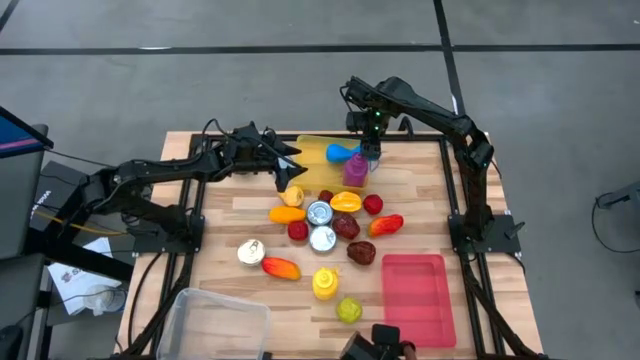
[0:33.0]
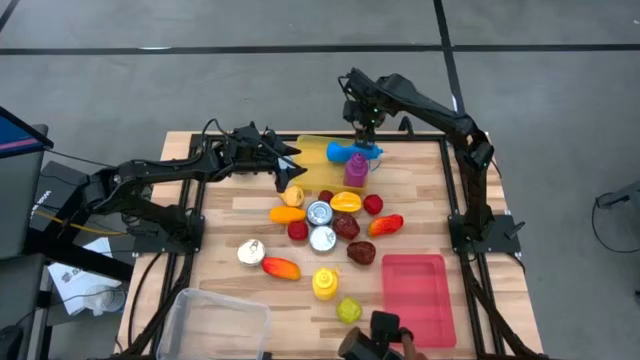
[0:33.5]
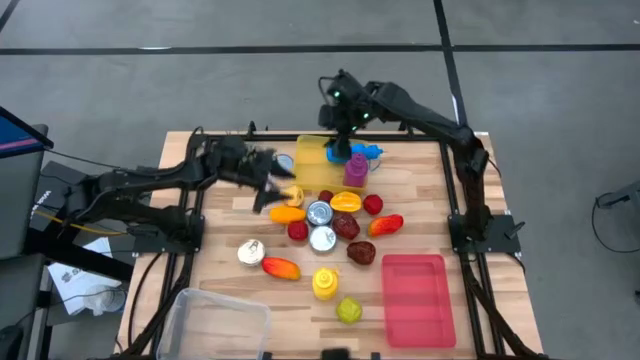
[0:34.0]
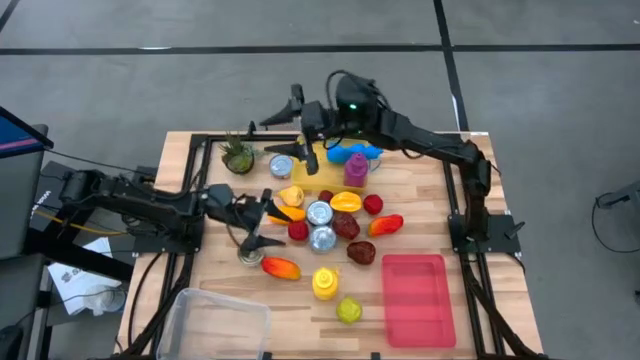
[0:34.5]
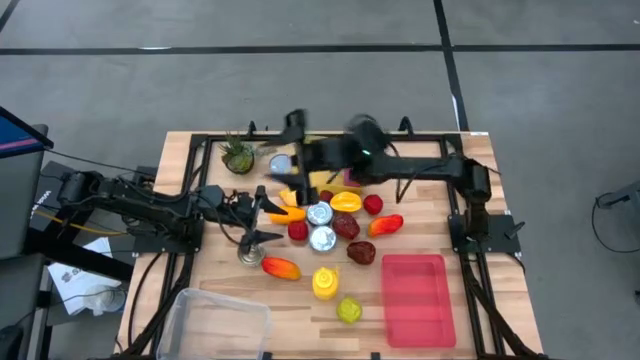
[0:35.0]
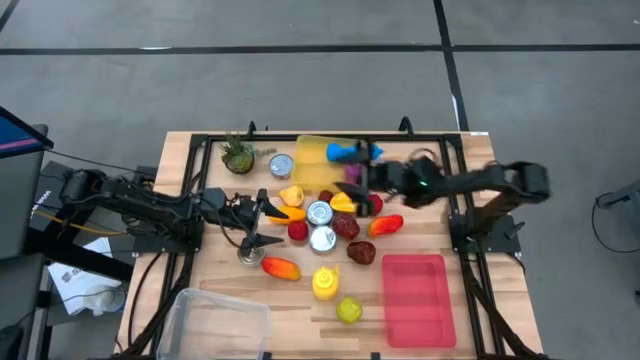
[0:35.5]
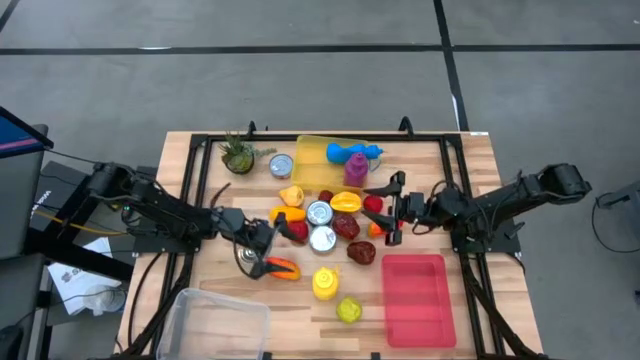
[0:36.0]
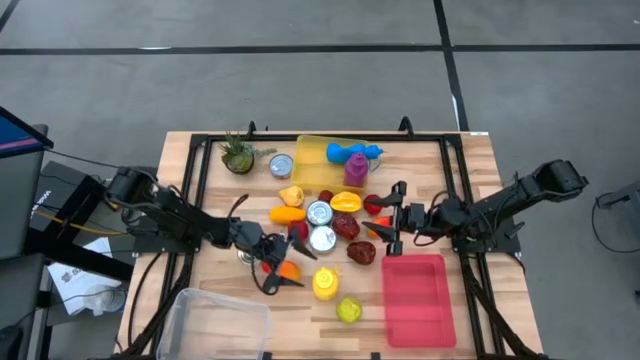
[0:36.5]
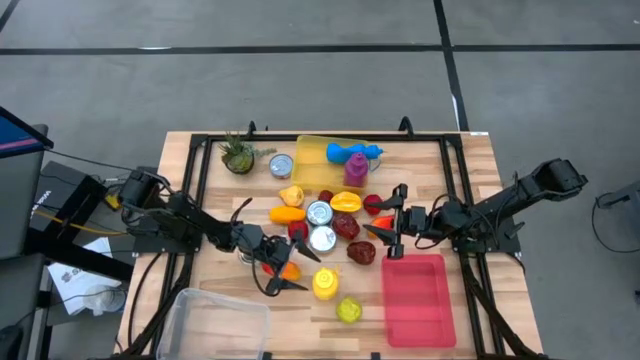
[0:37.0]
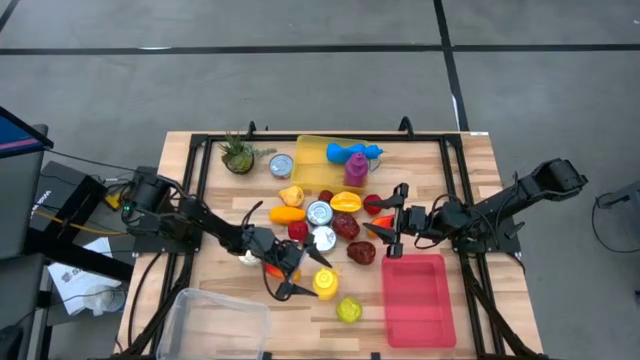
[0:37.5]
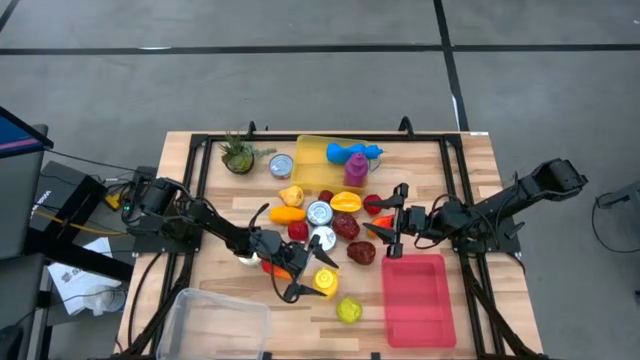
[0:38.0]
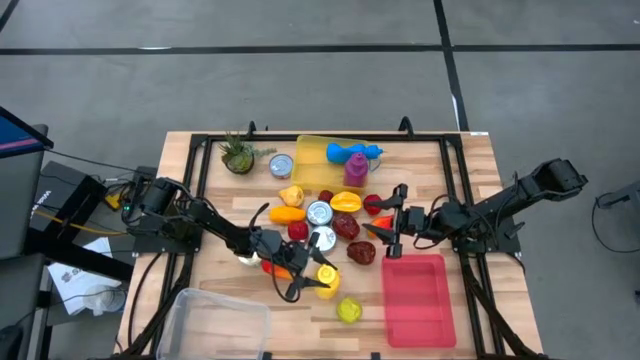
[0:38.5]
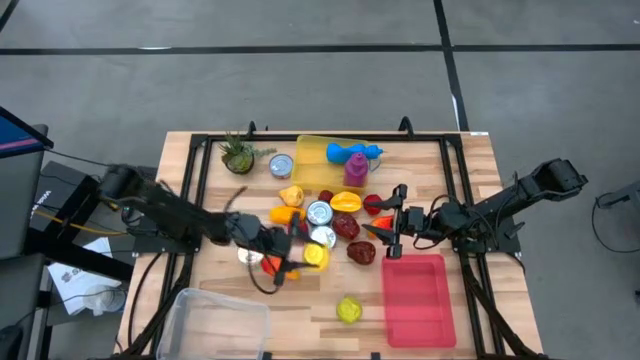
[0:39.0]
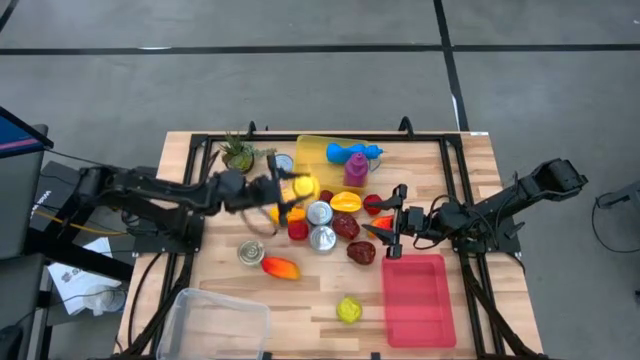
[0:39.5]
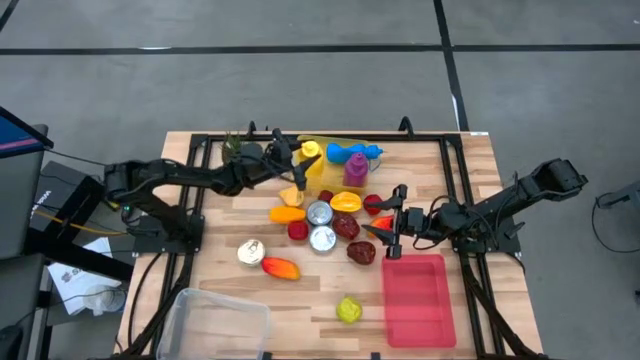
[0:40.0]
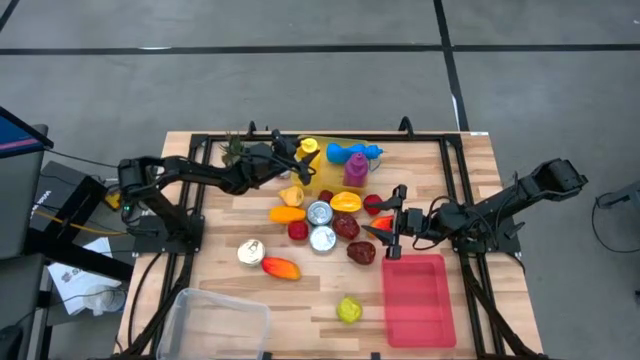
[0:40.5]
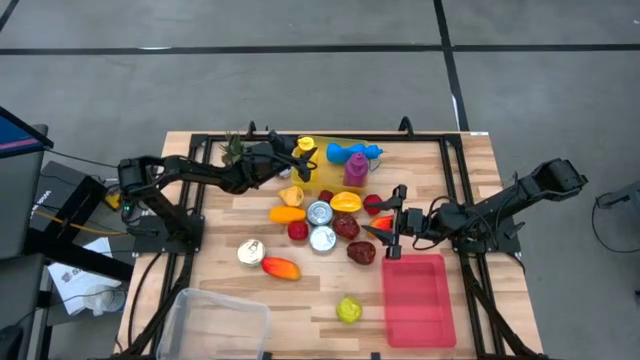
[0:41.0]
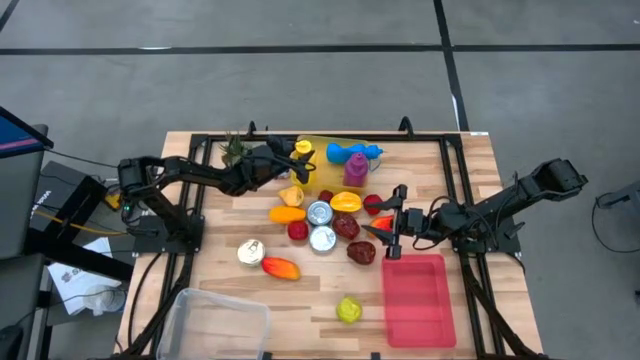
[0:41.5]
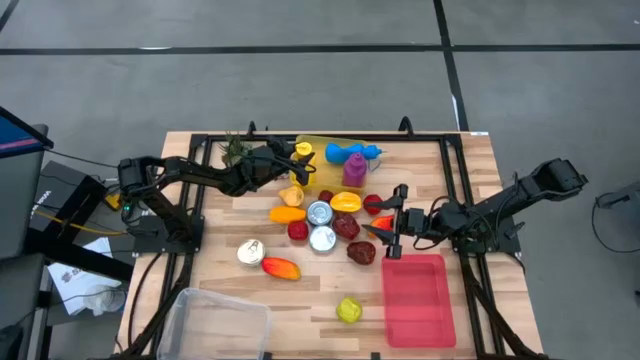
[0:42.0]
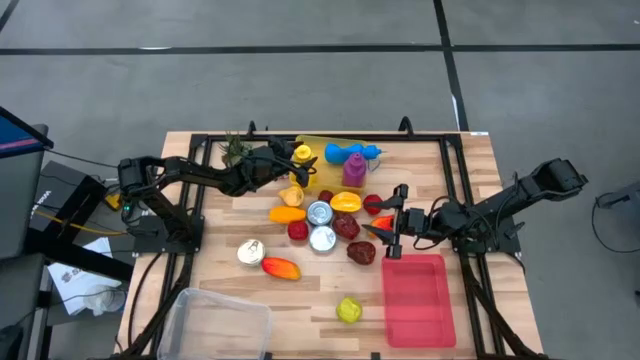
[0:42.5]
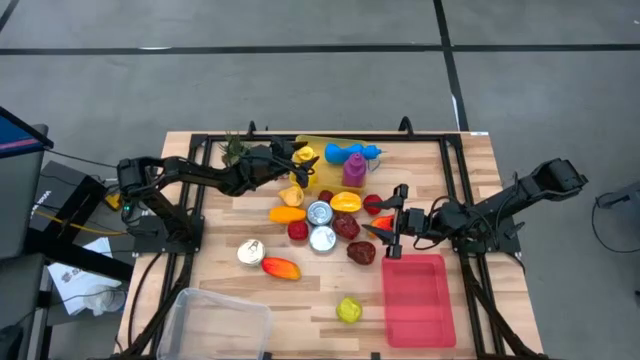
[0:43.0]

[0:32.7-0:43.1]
Task: Pick & Place Food Item
Put the yellow tumbler into the yellow bin

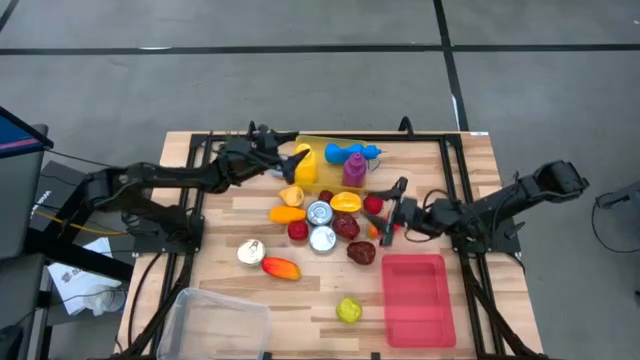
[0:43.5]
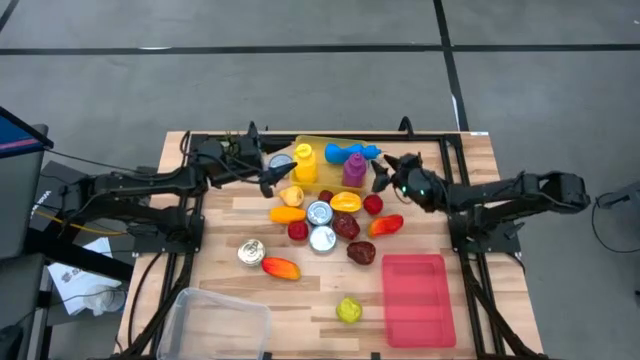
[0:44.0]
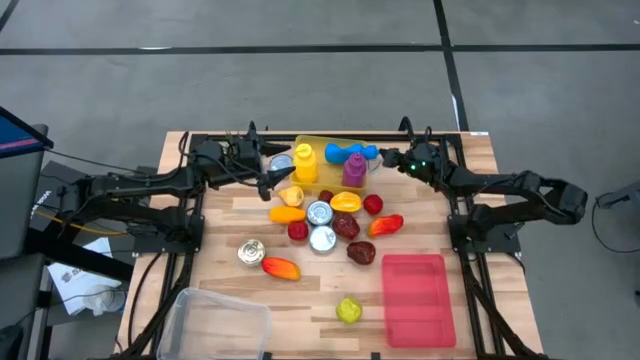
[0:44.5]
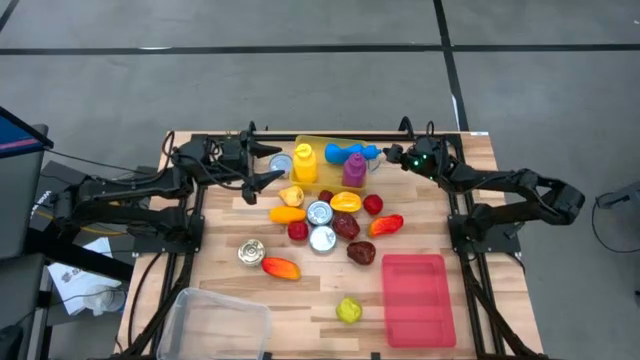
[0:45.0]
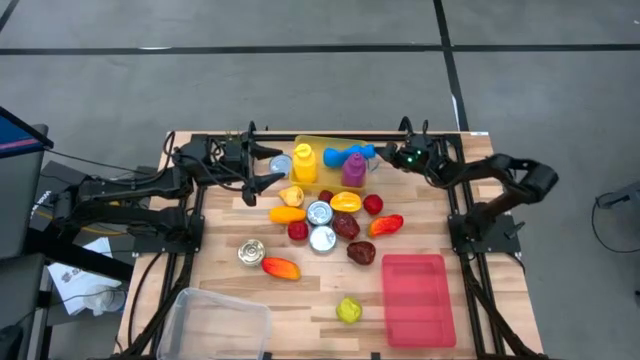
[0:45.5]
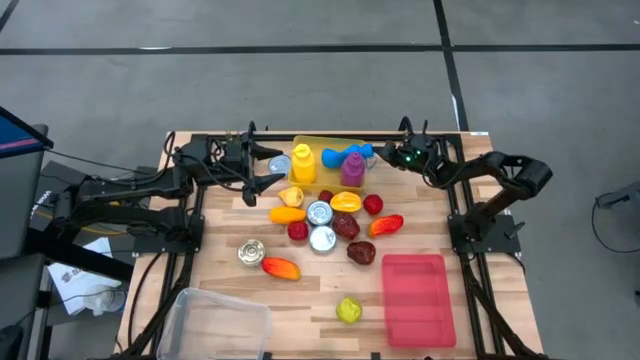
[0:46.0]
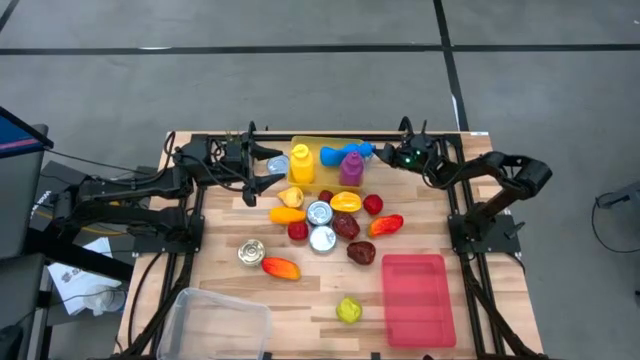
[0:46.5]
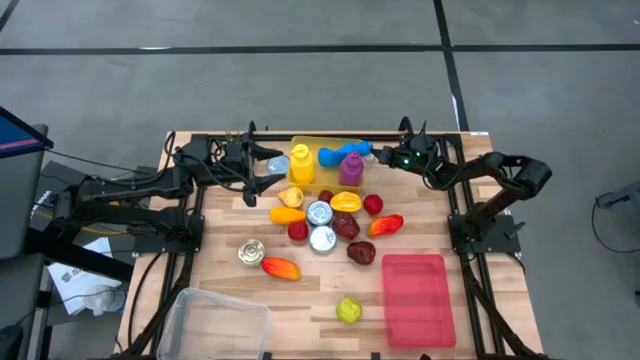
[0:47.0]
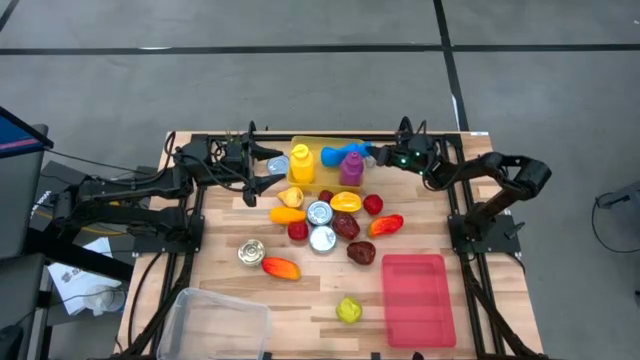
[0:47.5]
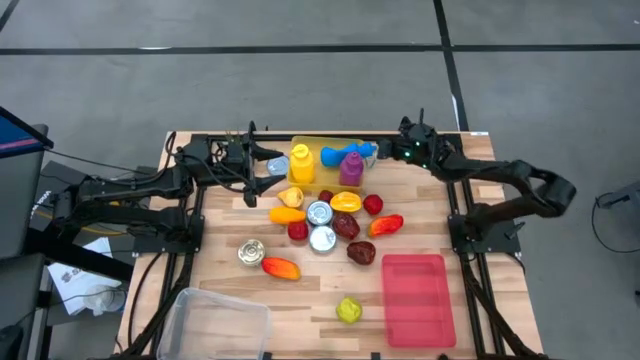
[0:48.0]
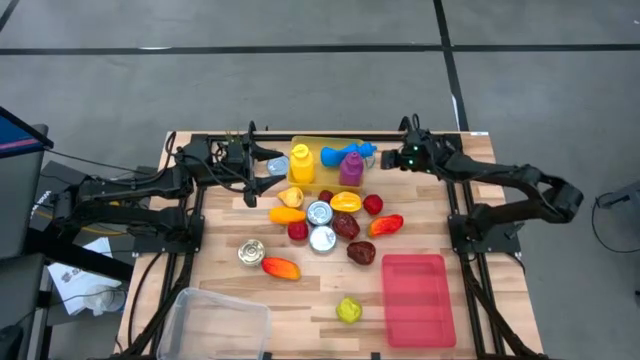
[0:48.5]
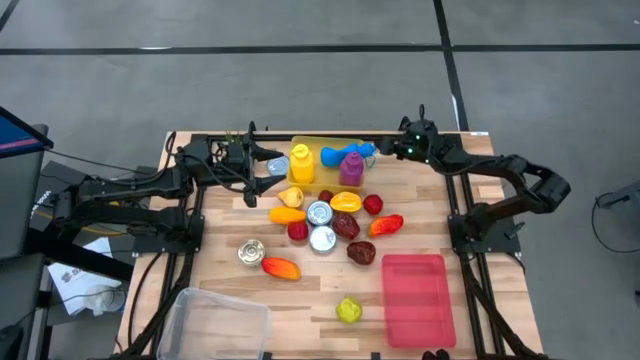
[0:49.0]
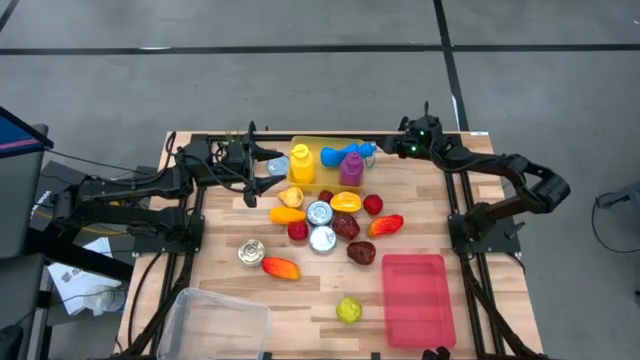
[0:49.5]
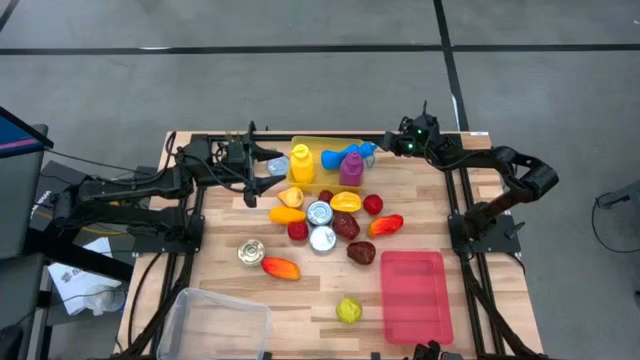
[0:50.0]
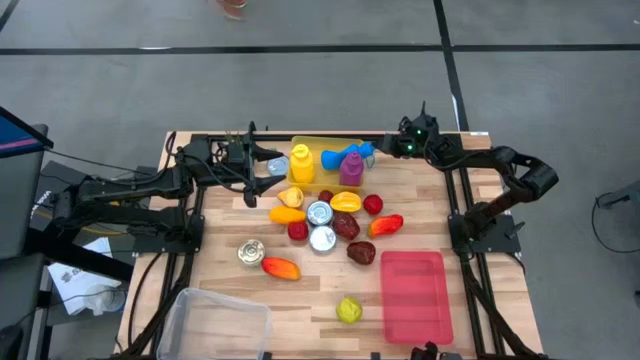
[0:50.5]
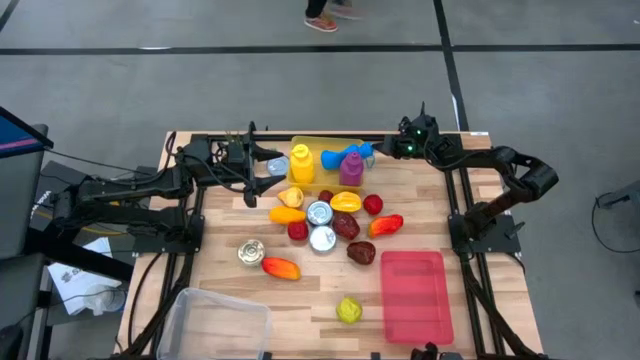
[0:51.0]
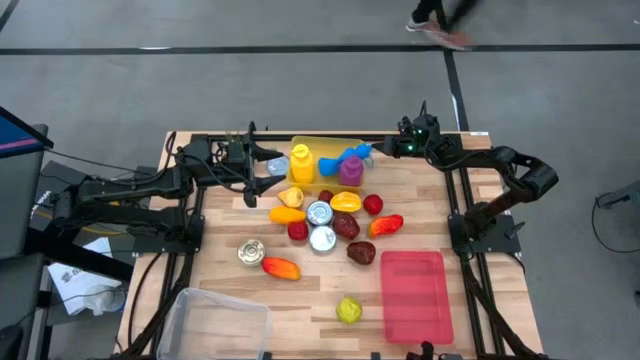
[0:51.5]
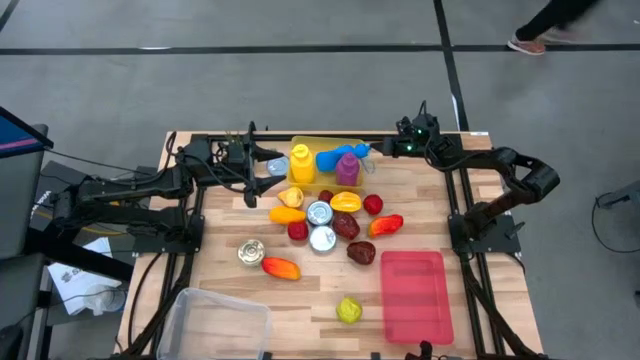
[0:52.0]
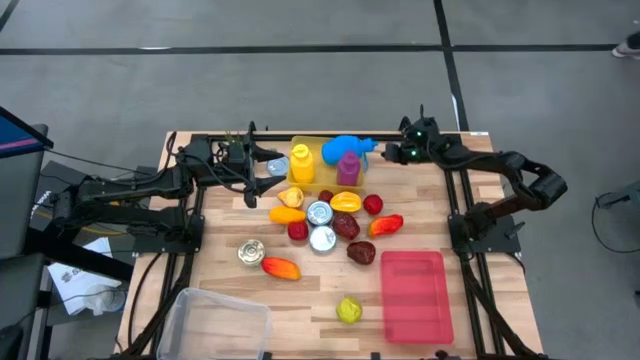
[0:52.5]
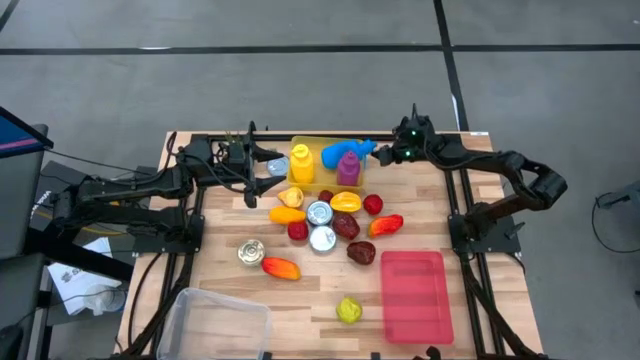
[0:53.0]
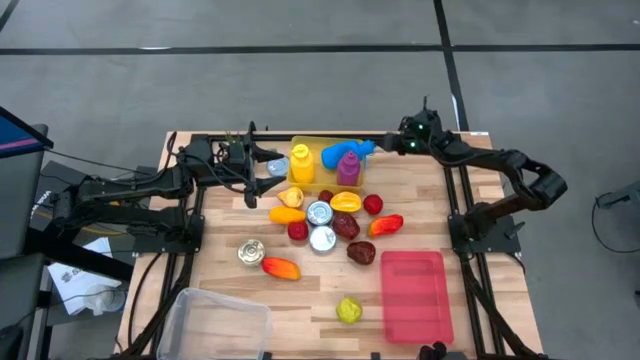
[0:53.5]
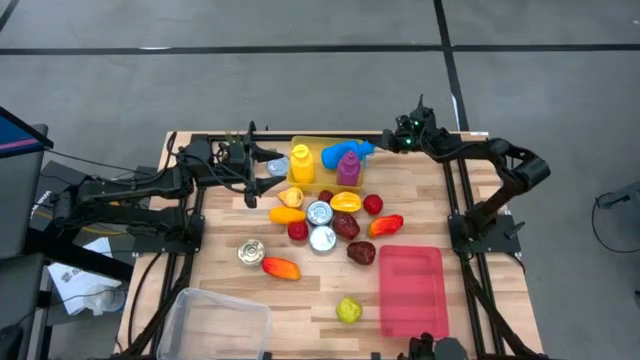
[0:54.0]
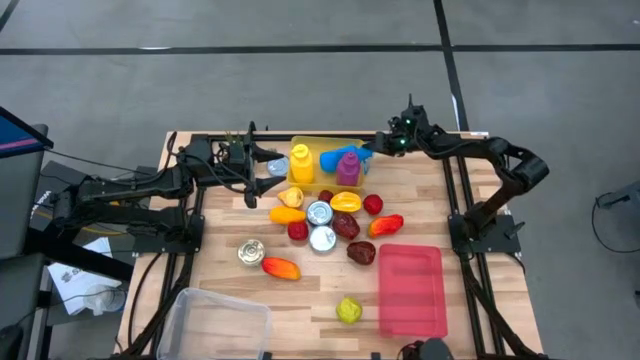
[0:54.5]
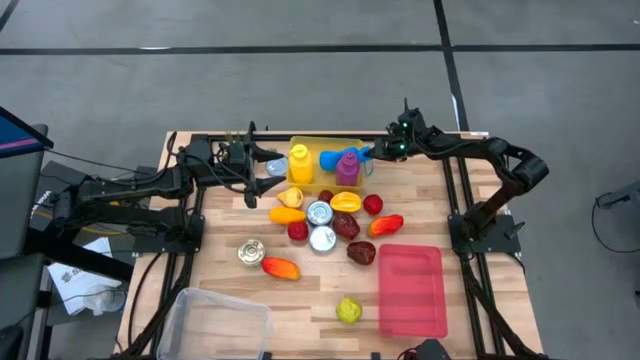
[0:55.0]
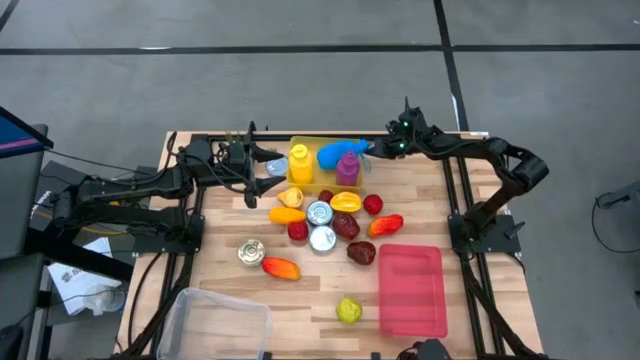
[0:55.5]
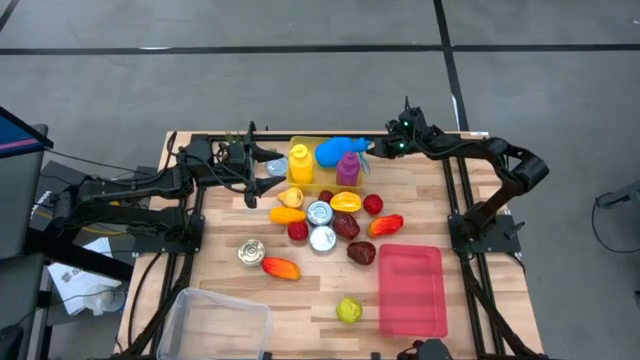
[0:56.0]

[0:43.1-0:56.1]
Adjust the blue tumbler in the yellow bin
